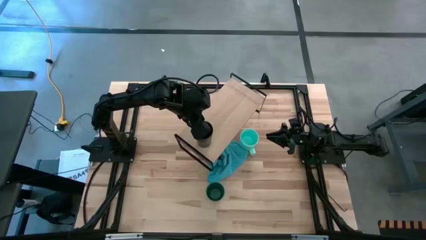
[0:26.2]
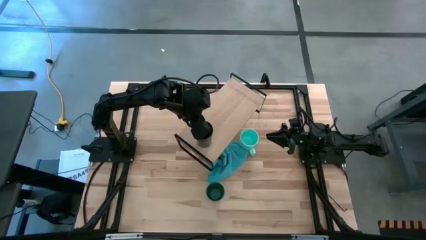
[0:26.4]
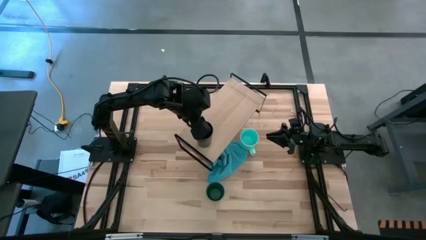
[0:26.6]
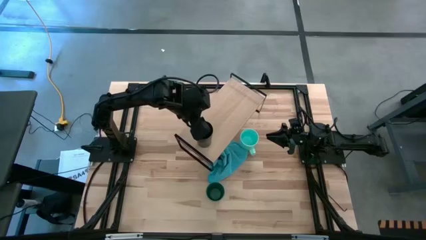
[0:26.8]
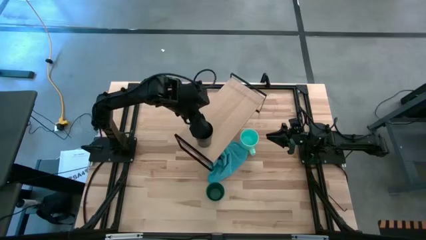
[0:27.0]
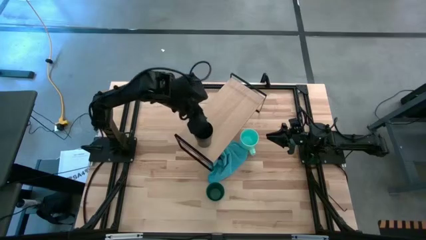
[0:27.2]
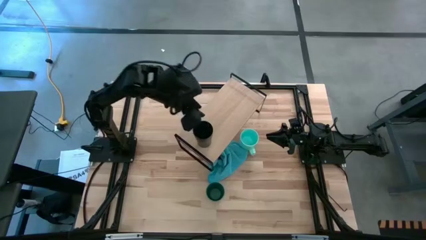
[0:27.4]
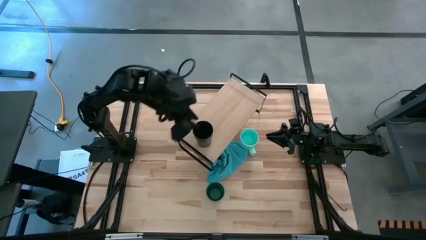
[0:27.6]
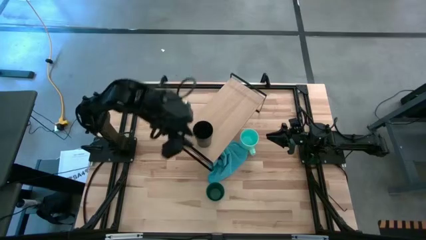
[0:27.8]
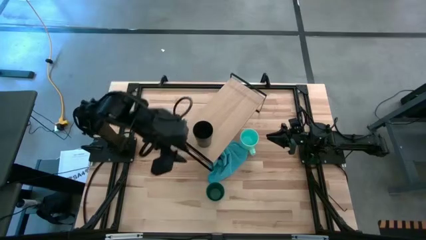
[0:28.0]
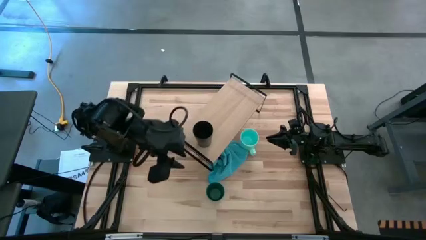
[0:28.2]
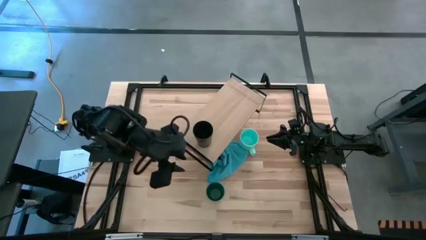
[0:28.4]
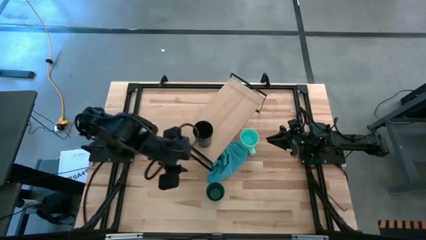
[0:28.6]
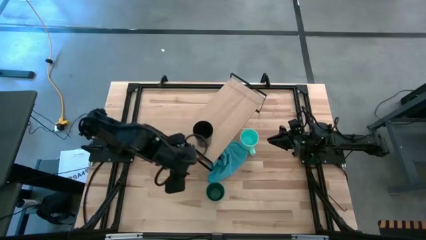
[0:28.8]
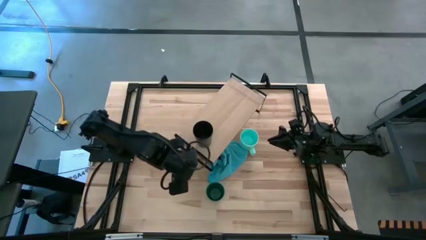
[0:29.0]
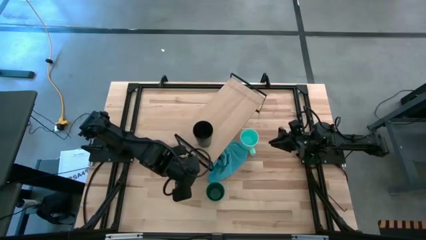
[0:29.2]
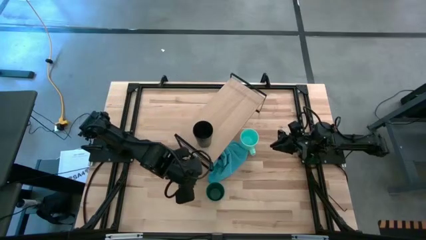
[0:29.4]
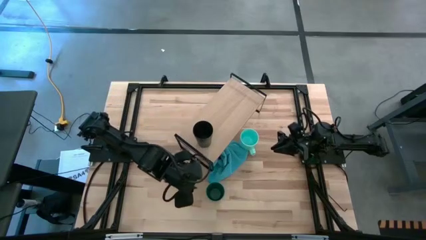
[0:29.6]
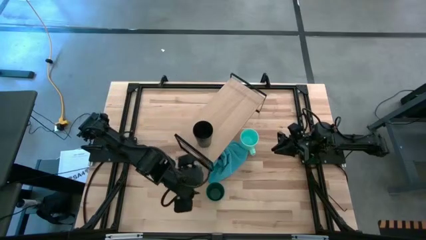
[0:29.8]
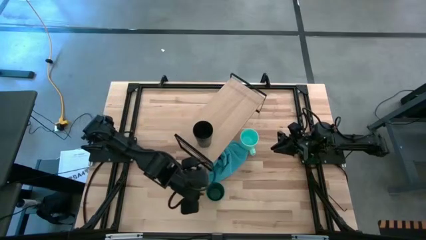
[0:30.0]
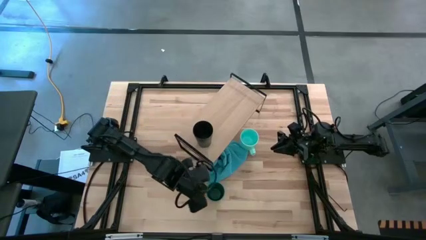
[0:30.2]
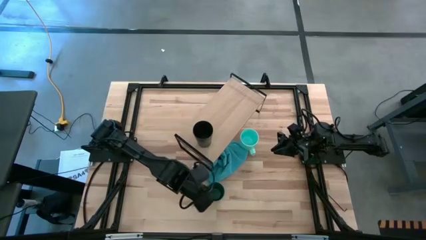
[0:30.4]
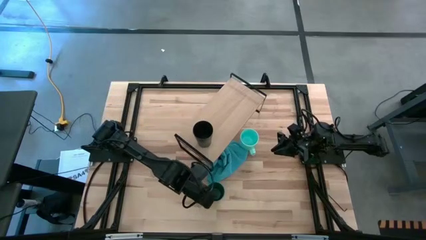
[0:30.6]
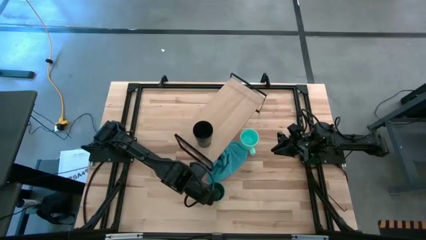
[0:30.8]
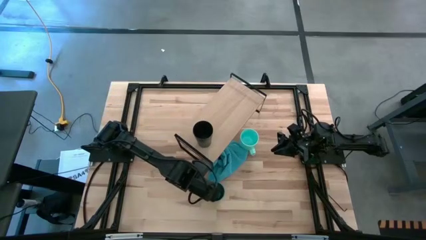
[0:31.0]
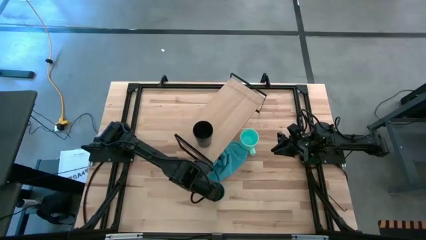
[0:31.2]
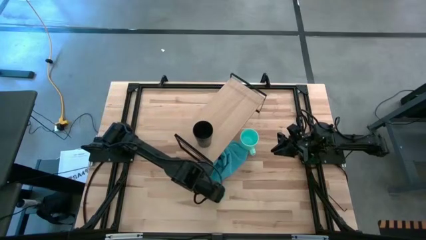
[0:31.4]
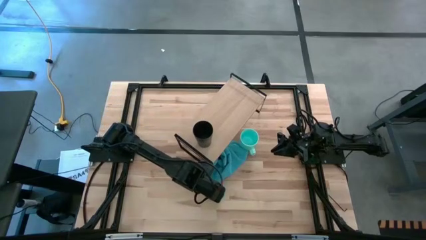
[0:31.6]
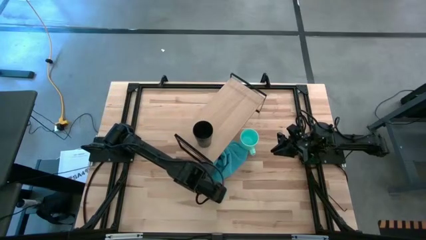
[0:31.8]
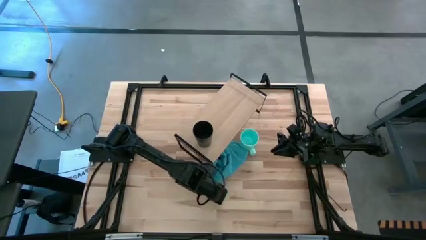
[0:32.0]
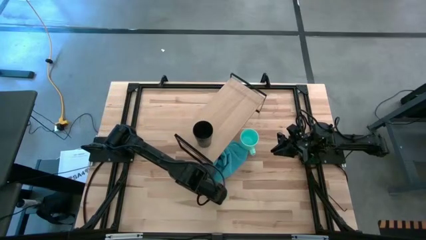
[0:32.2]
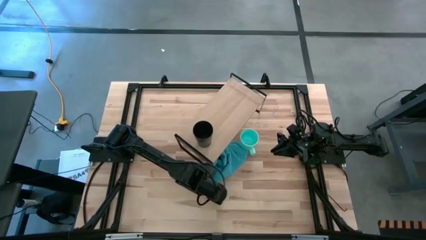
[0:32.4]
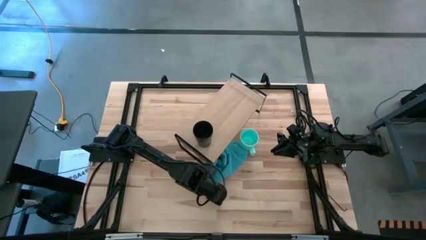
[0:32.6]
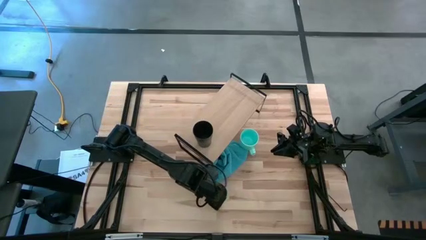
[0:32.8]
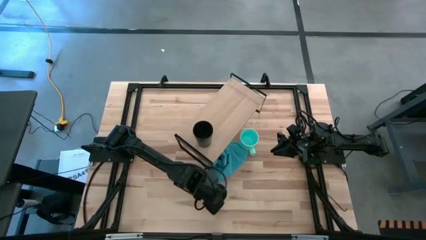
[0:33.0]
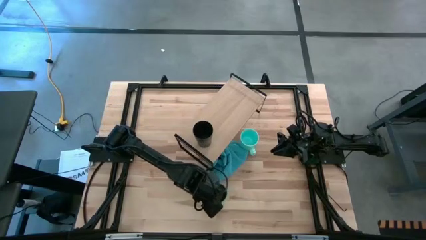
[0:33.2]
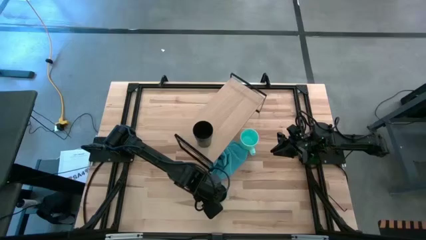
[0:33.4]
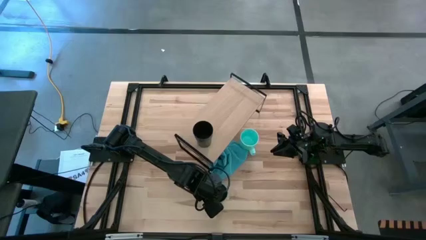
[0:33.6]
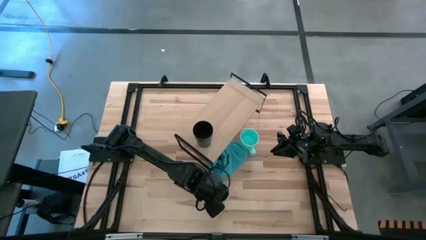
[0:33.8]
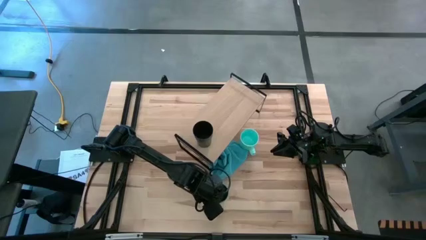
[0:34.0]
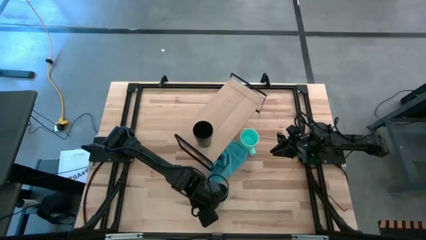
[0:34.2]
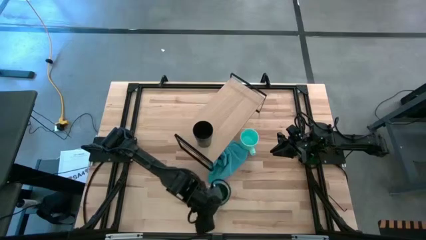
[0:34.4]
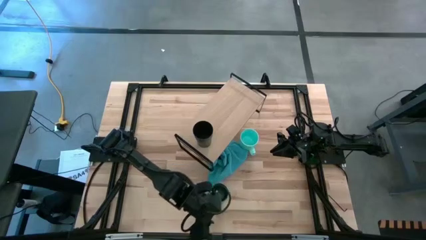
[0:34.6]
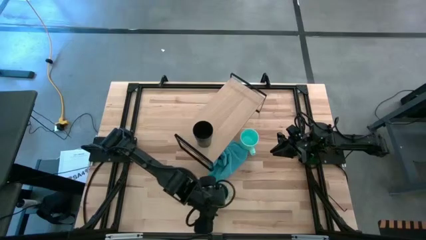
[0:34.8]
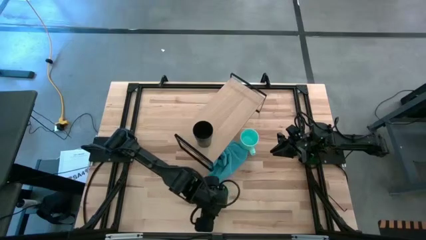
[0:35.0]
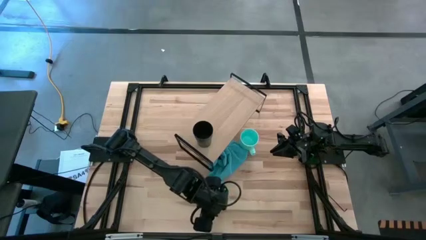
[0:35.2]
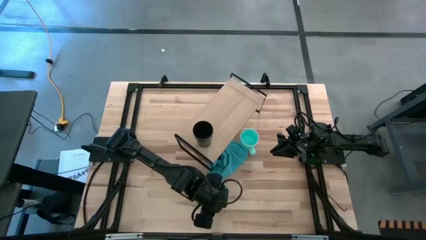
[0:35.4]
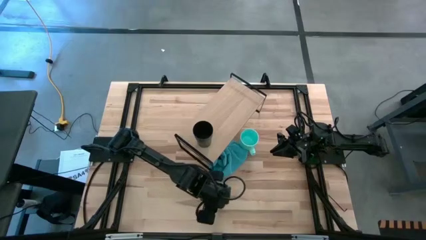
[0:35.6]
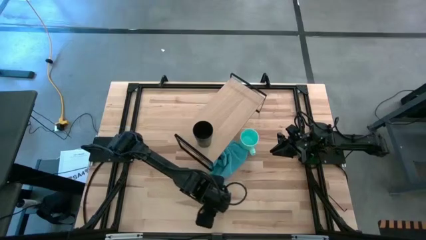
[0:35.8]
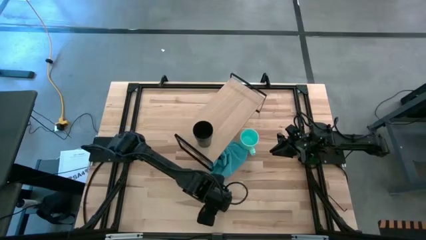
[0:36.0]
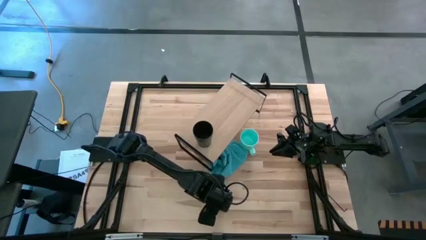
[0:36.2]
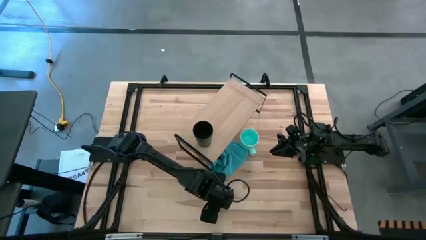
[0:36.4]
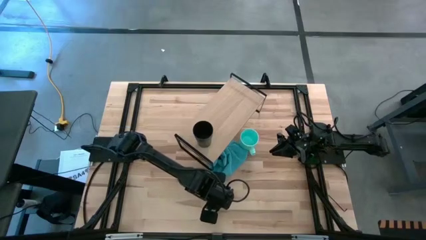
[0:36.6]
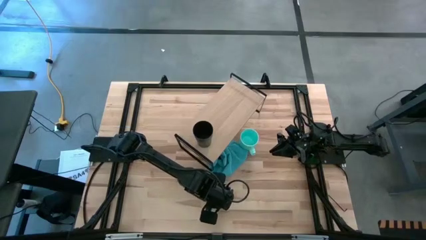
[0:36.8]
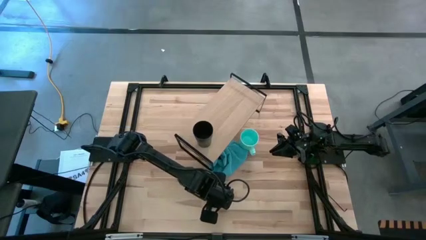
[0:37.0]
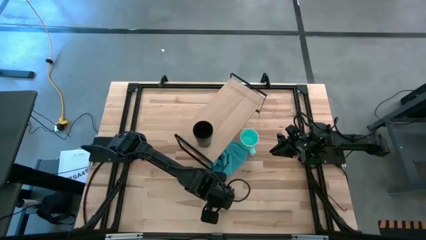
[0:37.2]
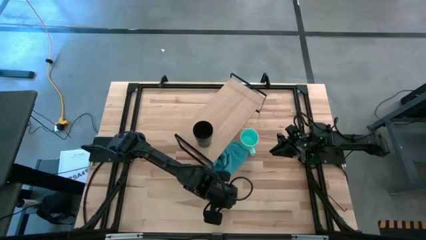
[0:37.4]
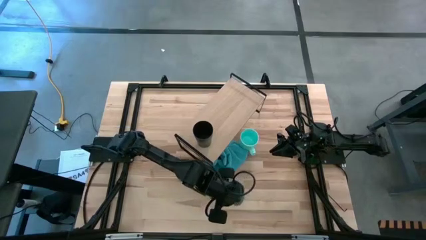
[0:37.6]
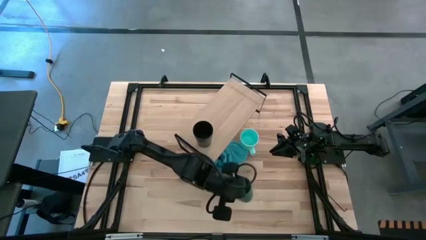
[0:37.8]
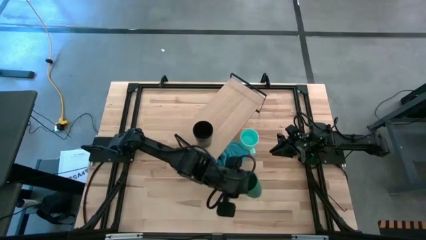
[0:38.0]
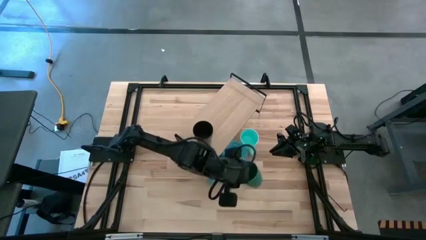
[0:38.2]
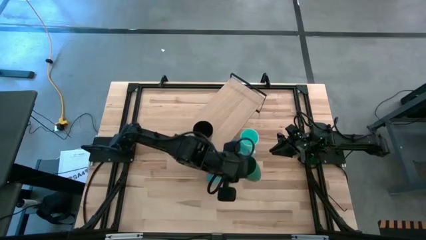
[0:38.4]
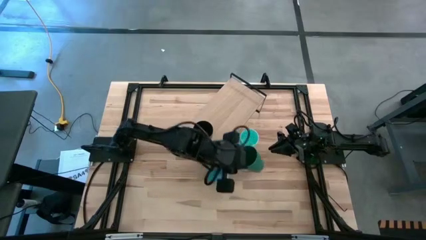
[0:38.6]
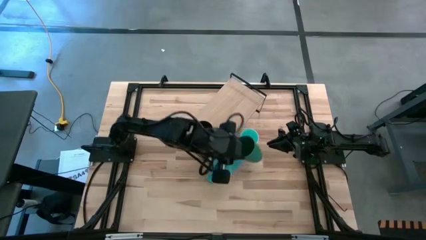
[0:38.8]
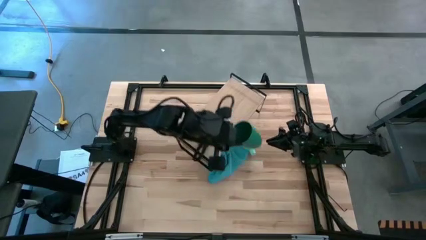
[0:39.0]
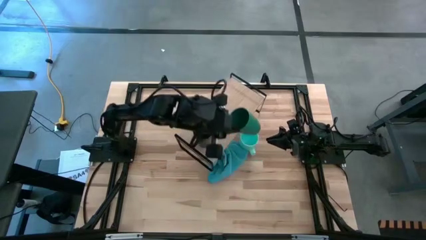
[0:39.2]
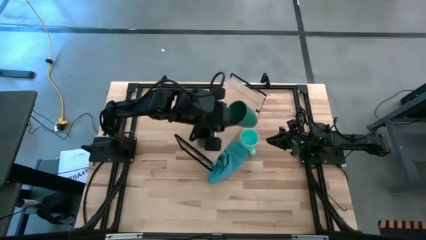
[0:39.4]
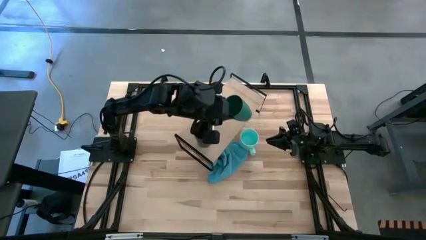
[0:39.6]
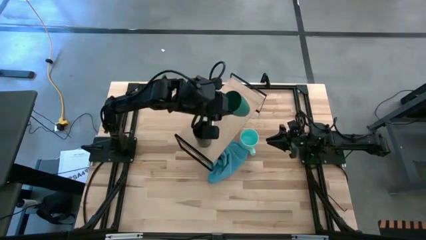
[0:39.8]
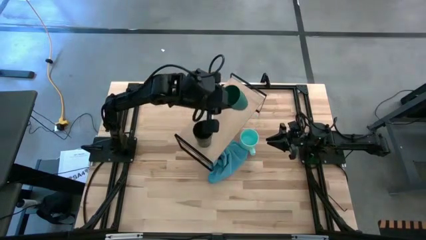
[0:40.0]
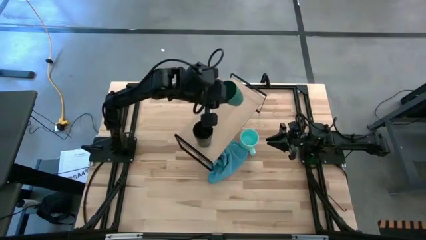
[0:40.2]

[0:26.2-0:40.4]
Task: Stack small to large cups/mugs on shelf
Put the green cup on the shelf

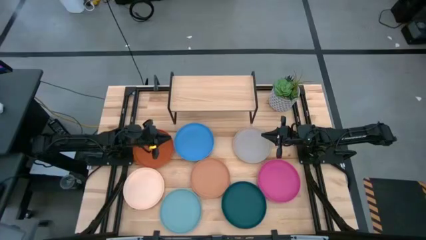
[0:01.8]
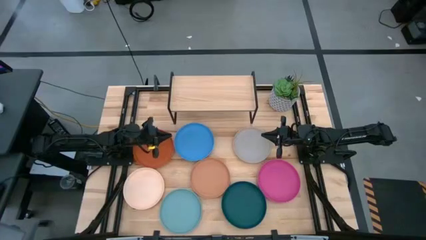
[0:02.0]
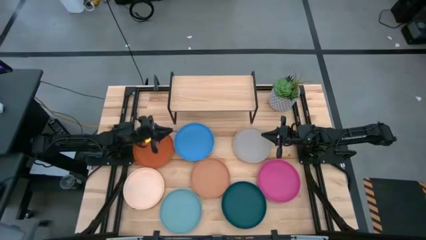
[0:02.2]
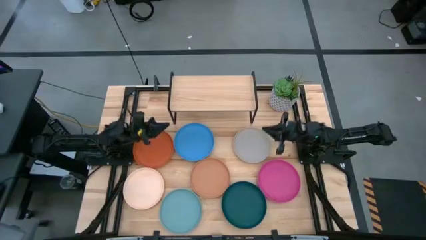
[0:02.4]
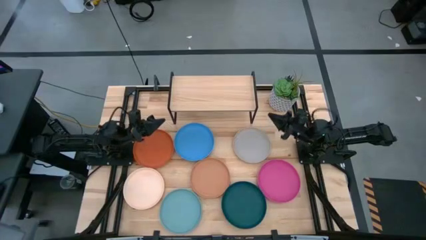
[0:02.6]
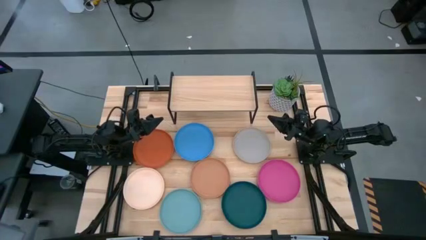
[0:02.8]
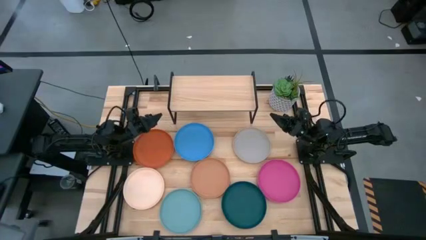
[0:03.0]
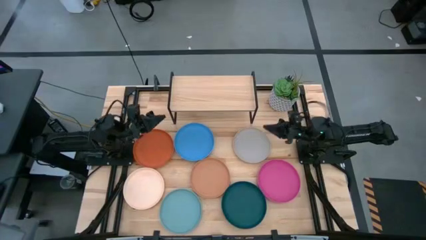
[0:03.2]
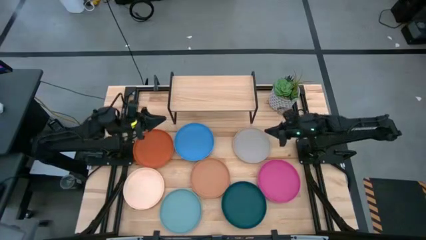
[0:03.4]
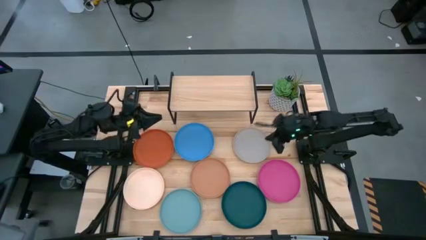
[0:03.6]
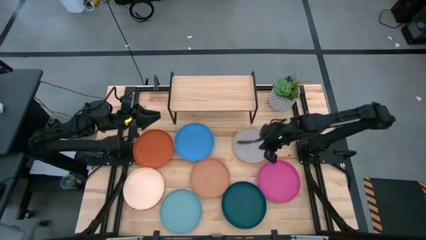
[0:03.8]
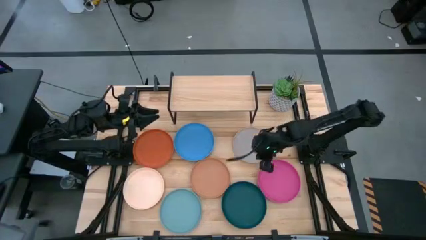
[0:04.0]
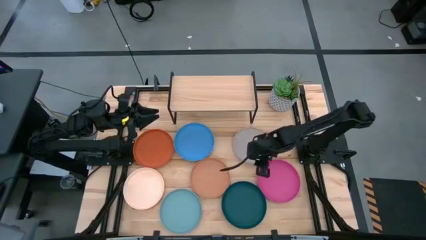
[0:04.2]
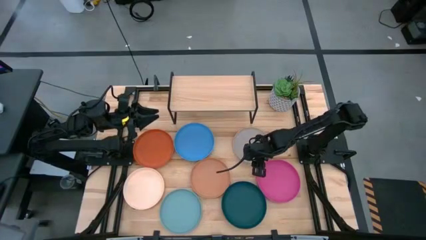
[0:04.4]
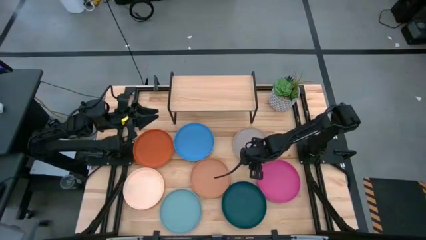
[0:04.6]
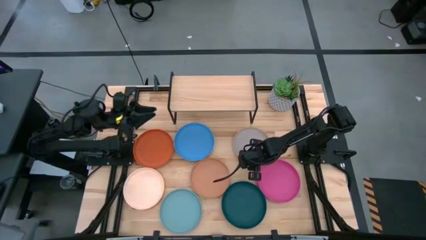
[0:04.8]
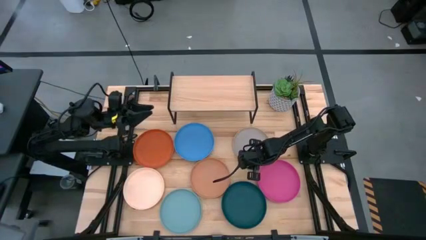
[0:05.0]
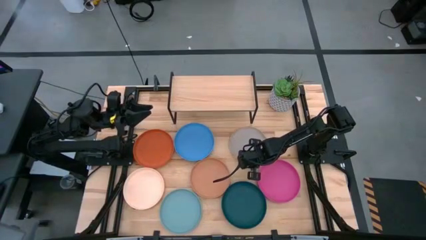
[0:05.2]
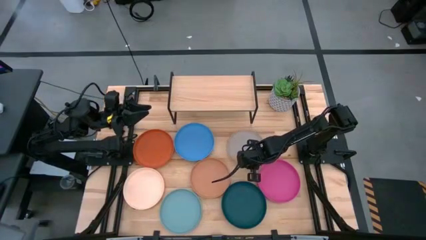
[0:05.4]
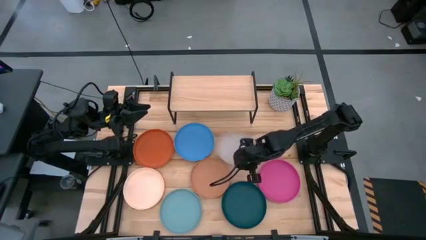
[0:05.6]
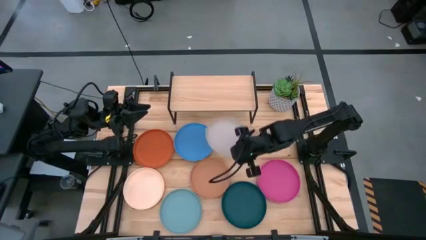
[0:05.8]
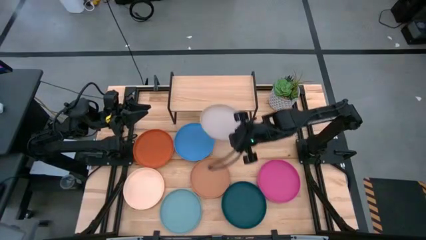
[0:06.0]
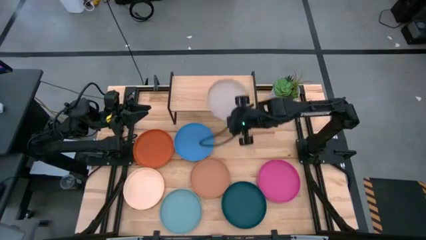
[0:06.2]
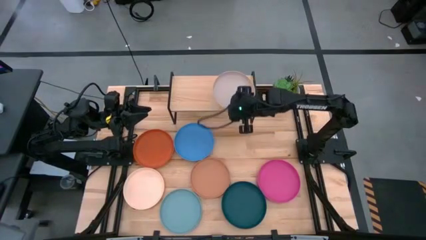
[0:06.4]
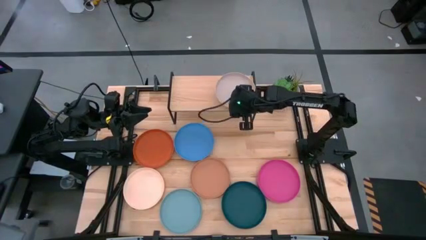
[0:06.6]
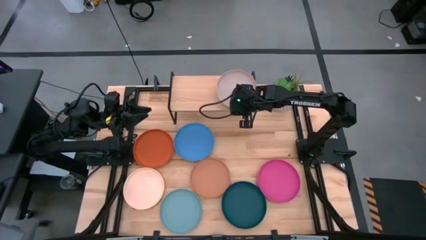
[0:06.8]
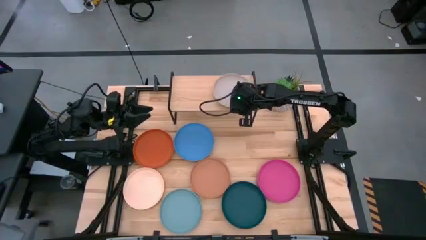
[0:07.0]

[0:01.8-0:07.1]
Task: Place and stack plates onto a shelf
Put the gray plate on the shelf
